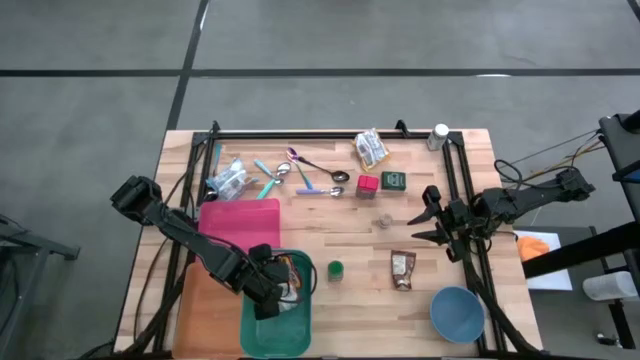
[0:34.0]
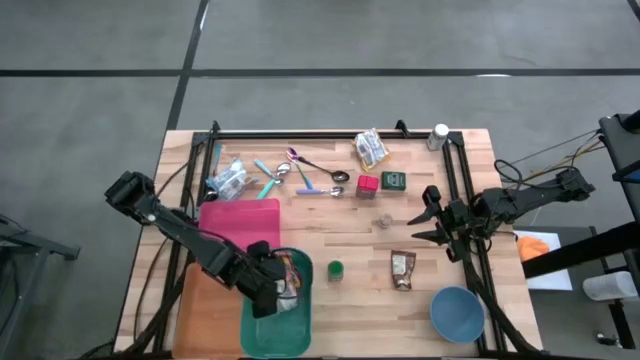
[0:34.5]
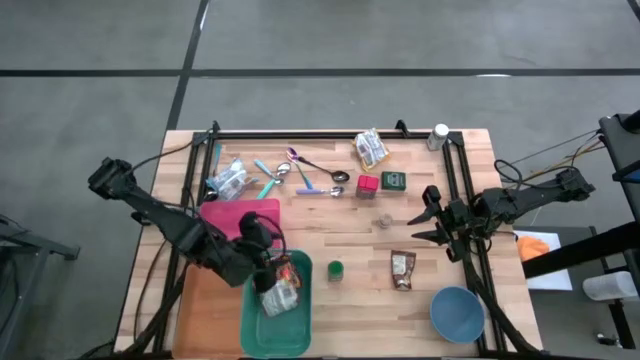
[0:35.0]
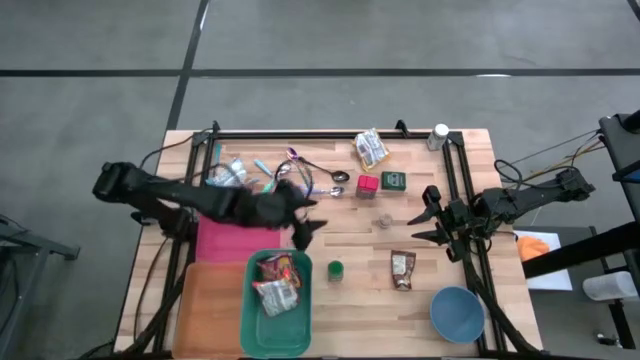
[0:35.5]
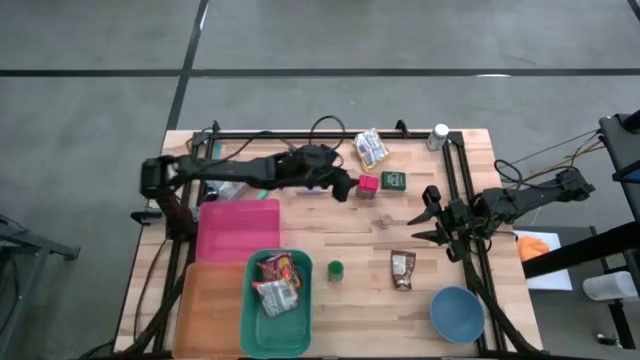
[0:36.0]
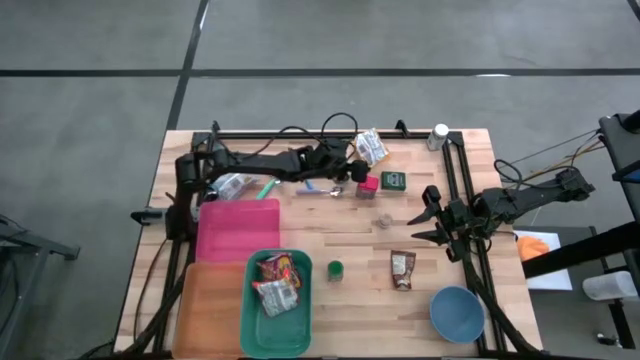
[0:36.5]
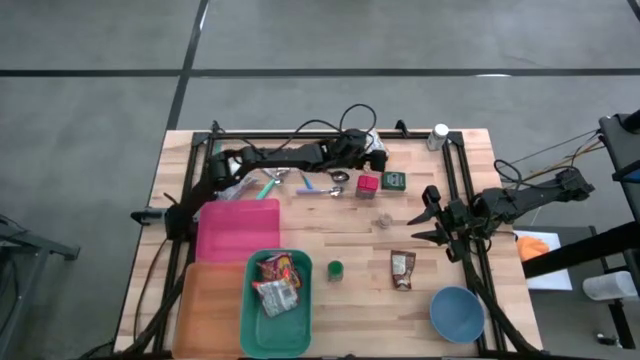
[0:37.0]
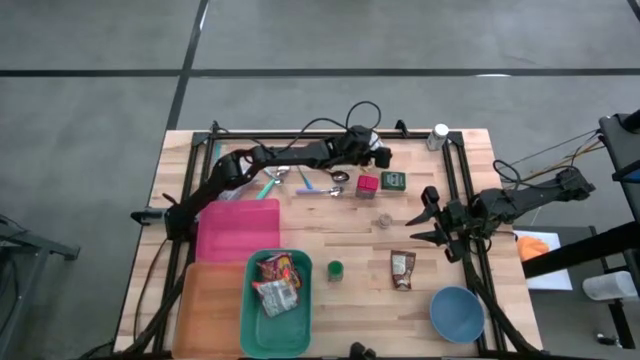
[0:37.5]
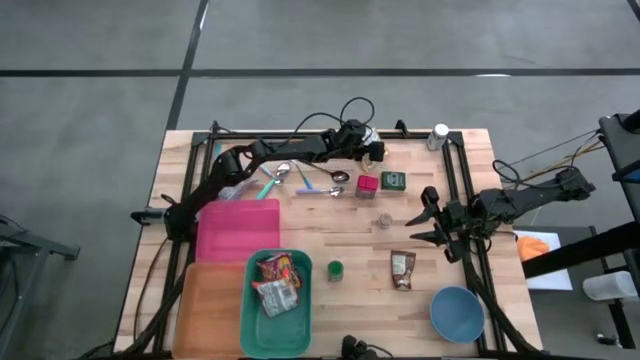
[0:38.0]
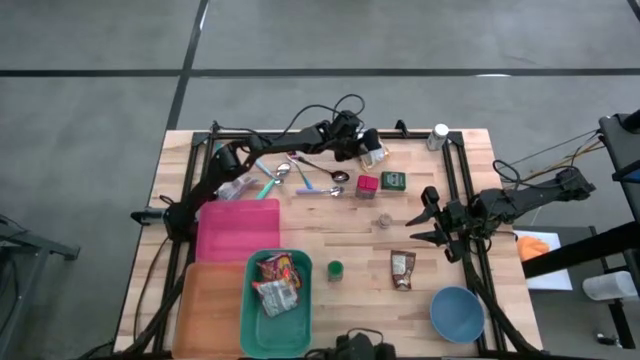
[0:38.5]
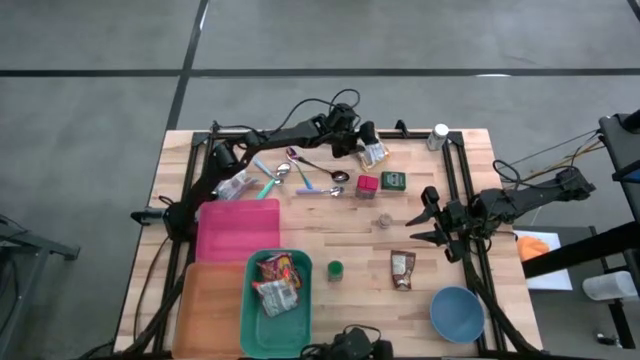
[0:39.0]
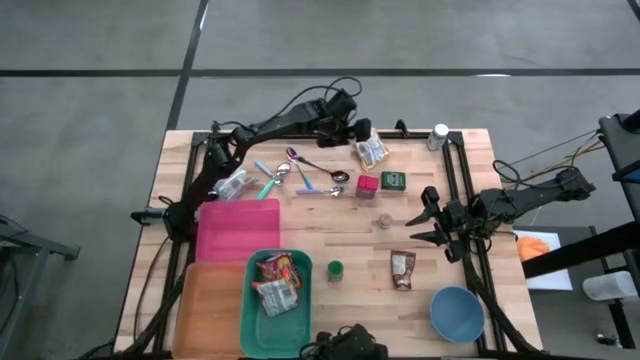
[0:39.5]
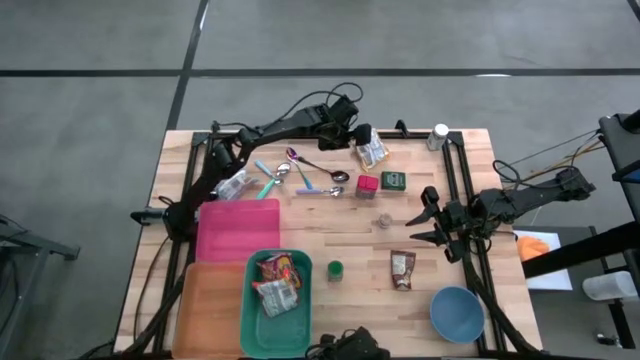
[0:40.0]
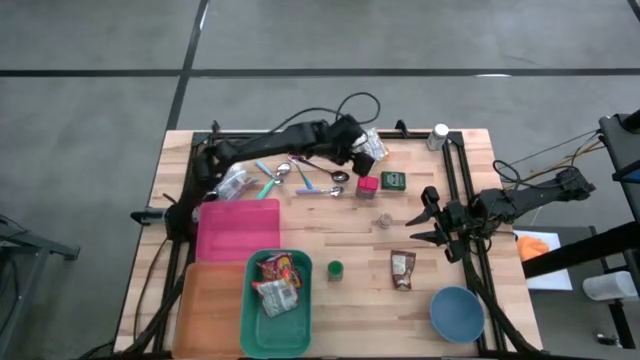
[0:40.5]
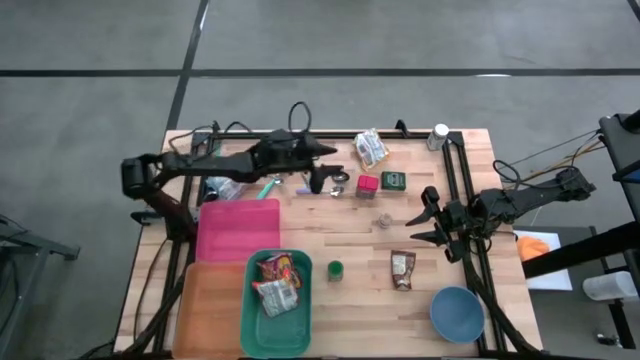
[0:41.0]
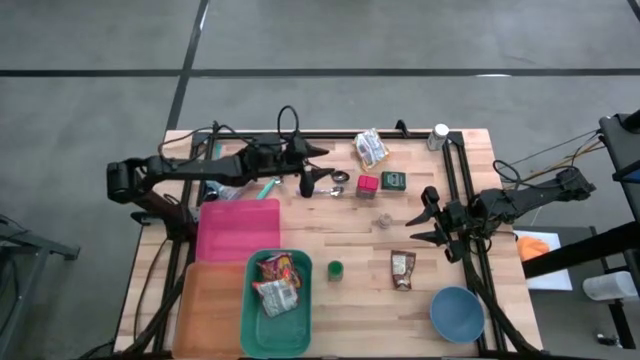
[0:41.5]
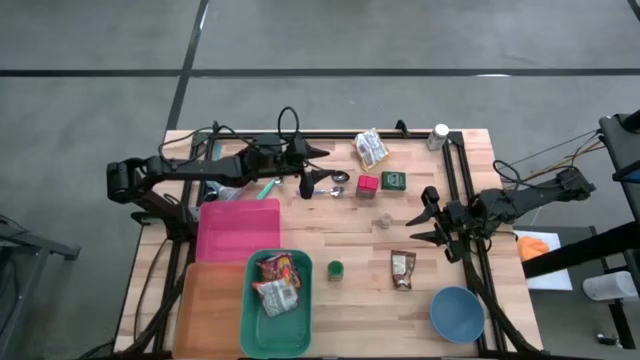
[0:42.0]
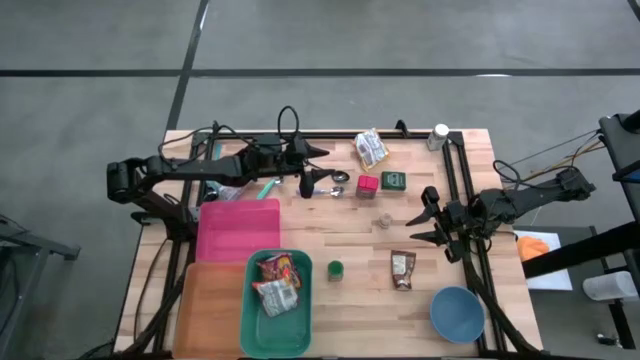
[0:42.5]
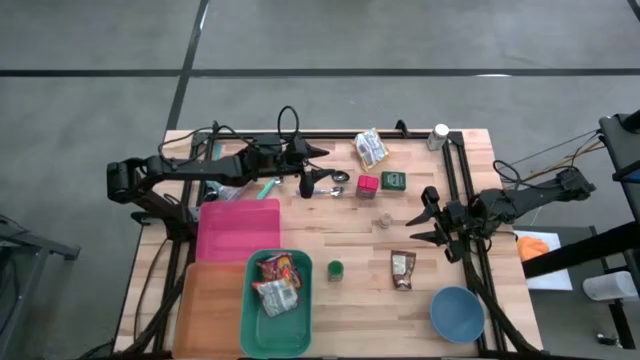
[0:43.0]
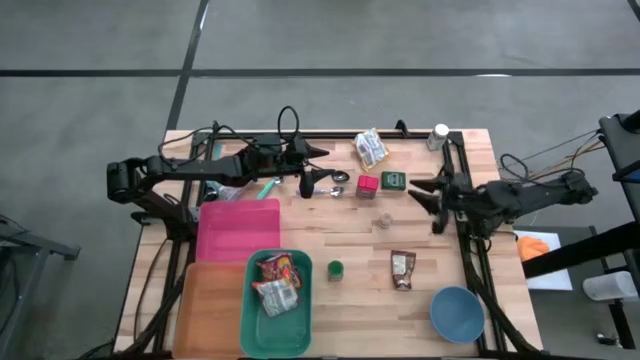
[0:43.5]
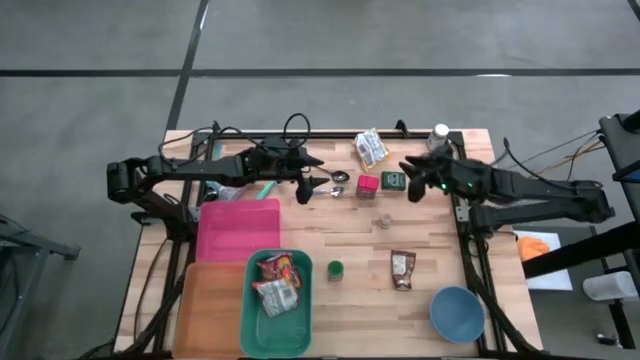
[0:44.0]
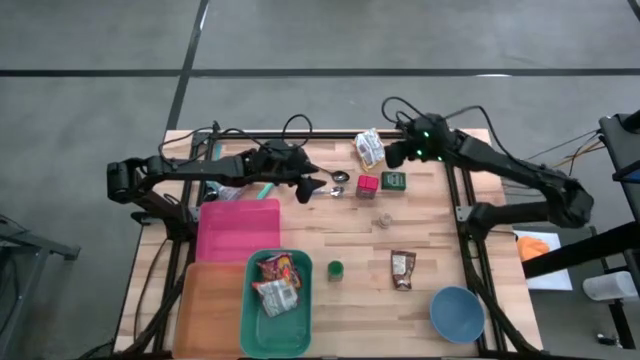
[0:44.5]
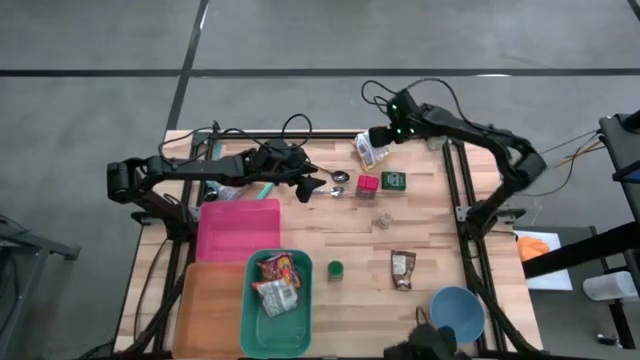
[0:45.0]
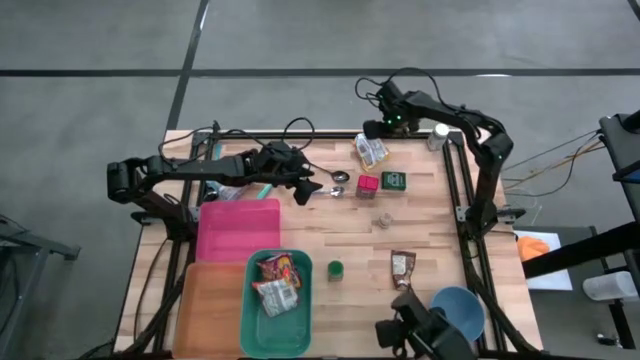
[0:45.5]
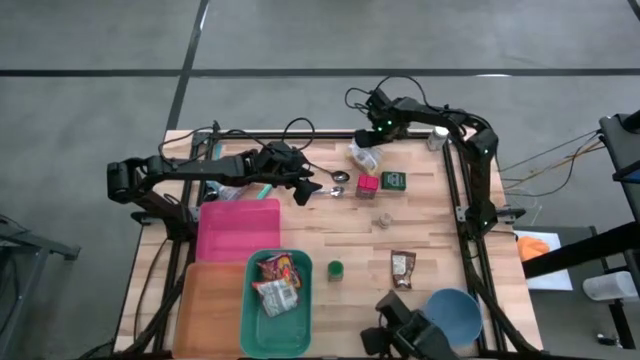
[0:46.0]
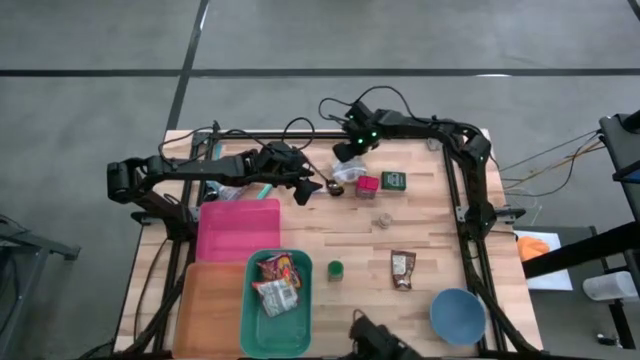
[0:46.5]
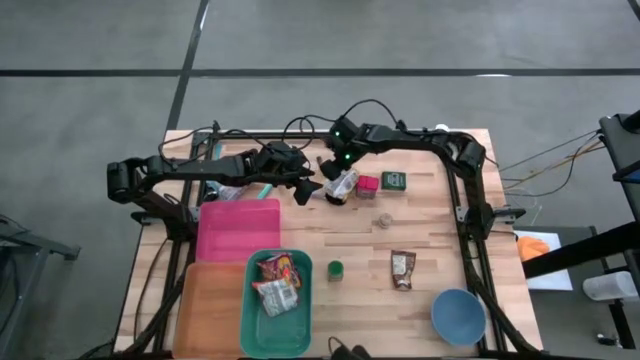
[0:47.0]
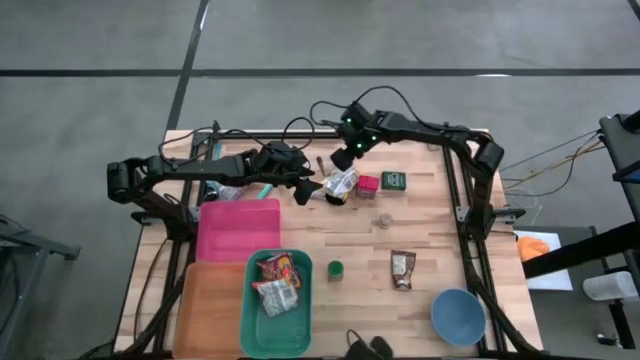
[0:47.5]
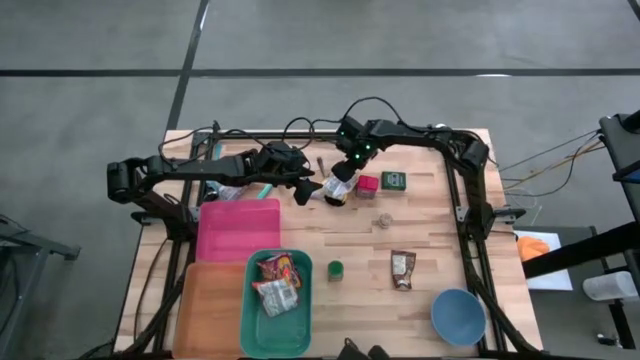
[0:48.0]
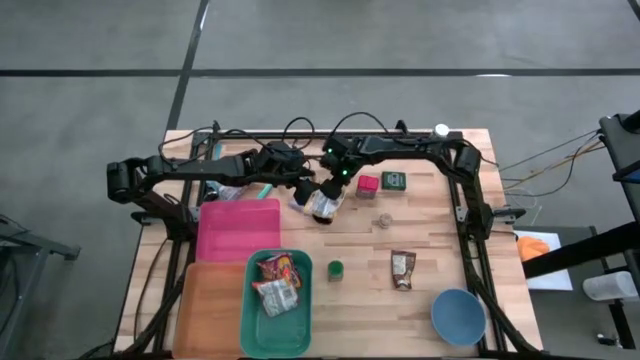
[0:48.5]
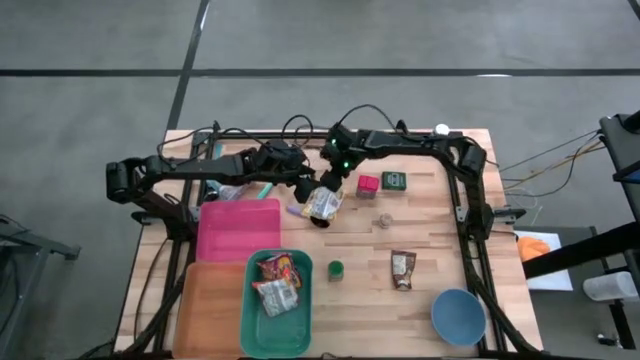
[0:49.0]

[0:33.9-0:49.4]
Move the yellow noodle pack on the table
